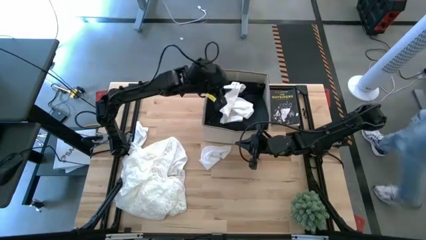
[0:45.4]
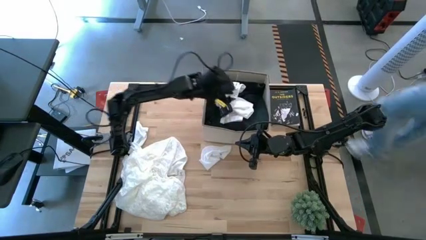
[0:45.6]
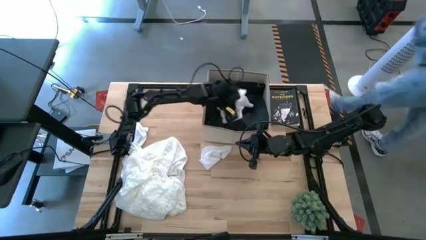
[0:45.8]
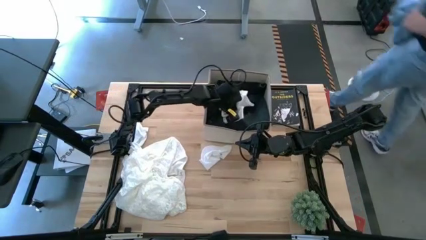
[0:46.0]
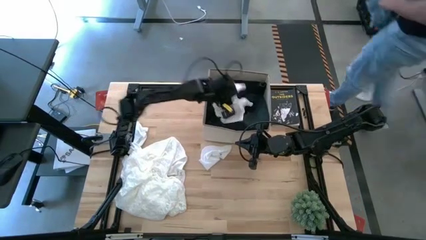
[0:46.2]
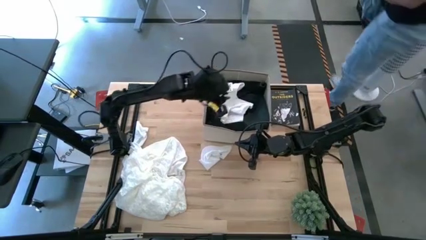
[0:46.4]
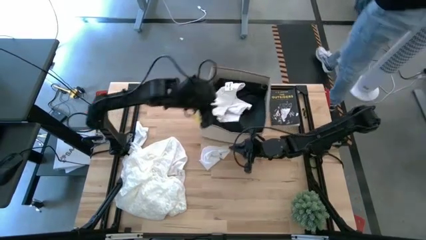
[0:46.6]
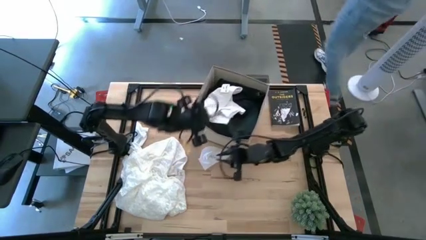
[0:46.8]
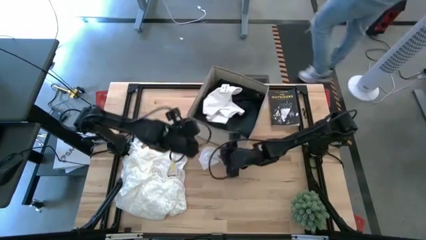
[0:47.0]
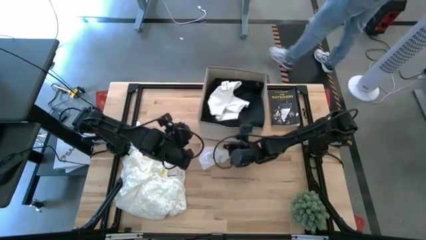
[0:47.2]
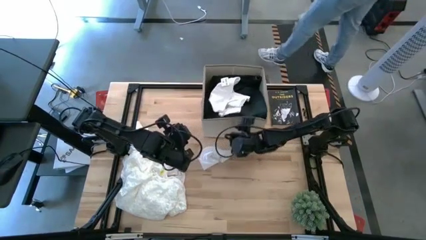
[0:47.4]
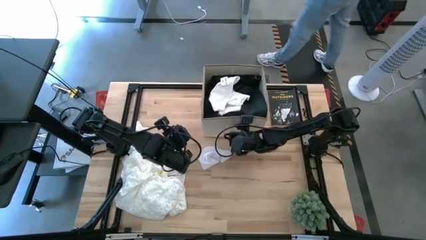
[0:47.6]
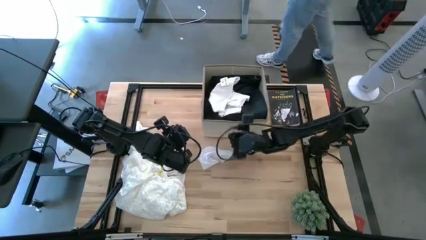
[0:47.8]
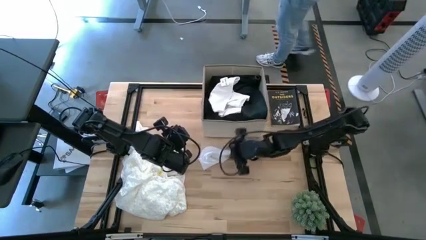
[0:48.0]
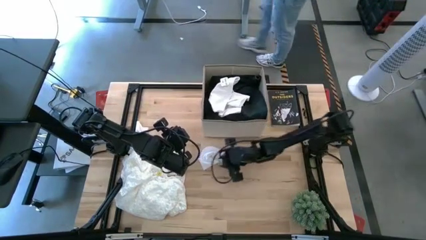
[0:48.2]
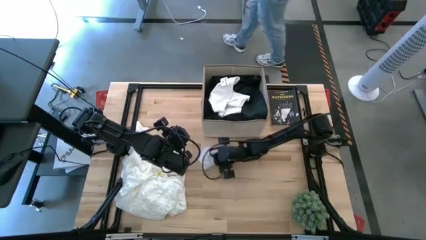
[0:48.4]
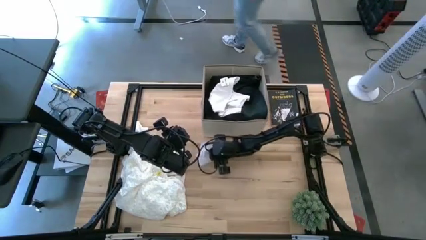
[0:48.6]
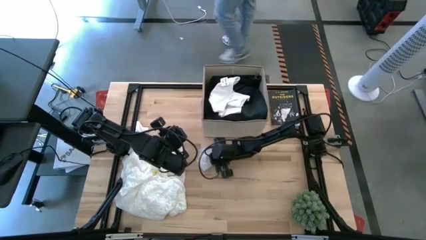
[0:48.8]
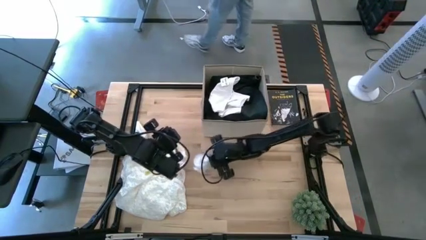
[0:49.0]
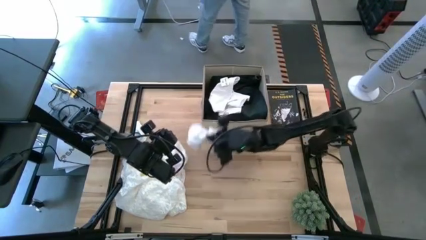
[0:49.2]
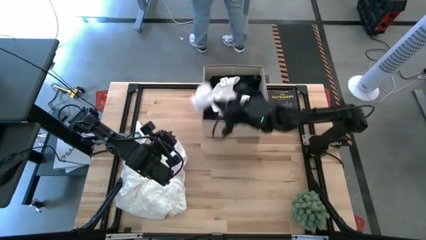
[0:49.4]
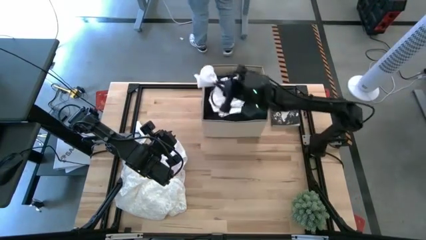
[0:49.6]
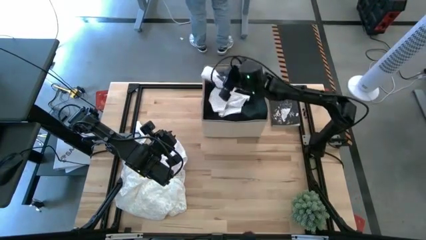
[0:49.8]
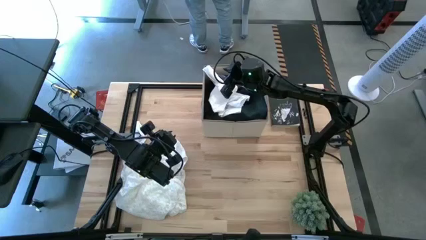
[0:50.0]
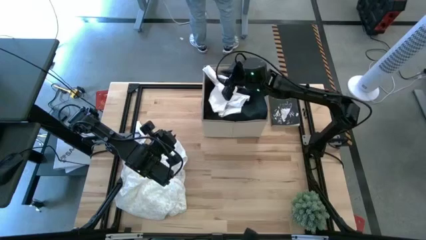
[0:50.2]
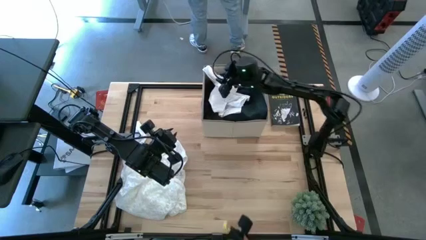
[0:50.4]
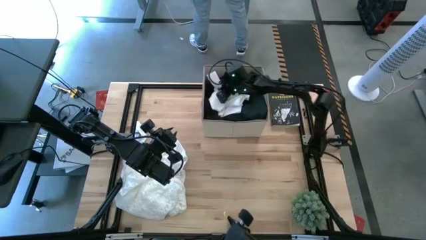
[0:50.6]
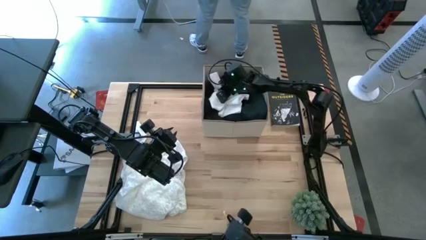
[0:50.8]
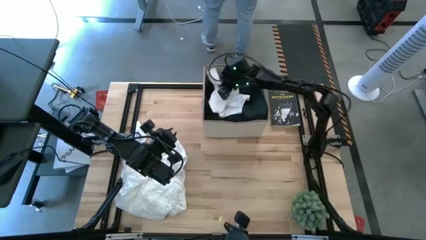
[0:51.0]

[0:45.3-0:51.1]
Task: Sort clothes
Put the right white sock into the laundry organizer

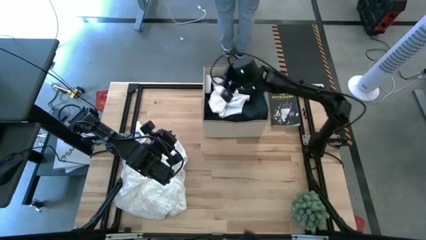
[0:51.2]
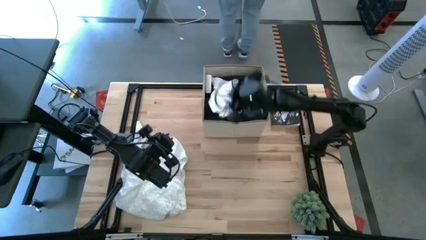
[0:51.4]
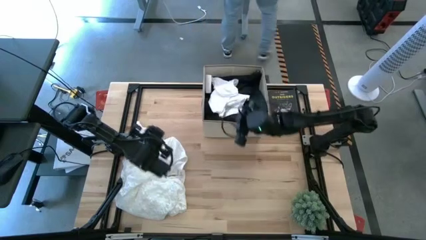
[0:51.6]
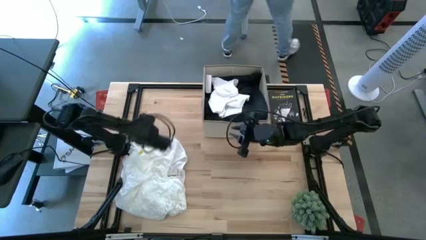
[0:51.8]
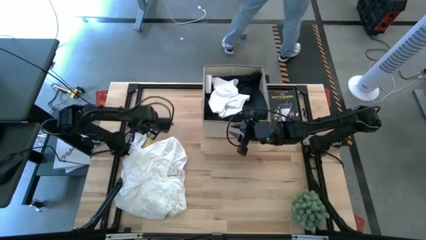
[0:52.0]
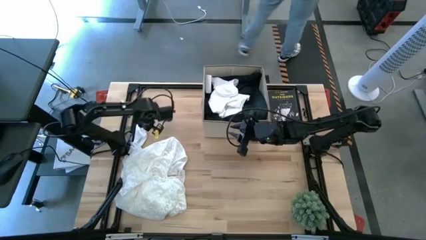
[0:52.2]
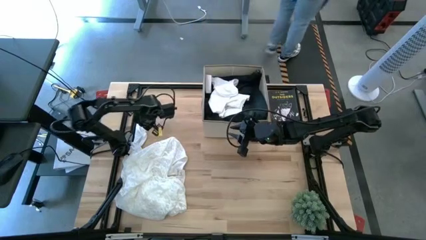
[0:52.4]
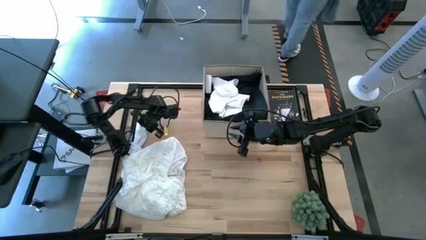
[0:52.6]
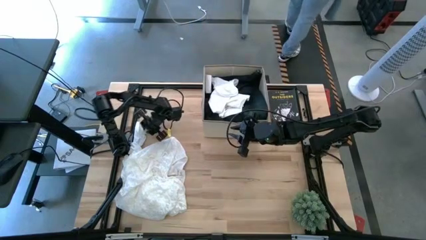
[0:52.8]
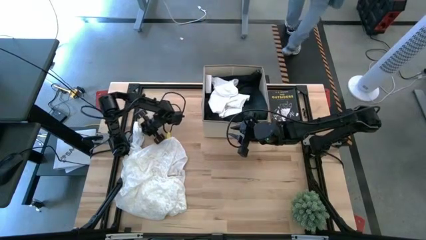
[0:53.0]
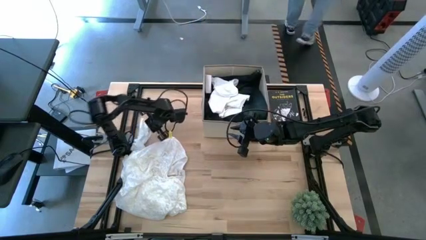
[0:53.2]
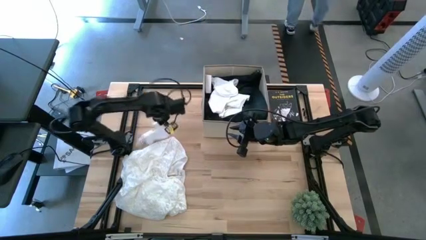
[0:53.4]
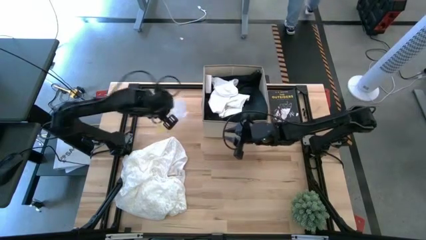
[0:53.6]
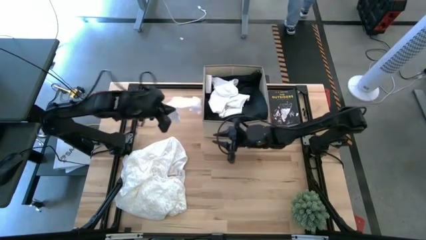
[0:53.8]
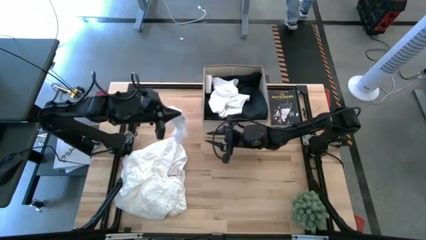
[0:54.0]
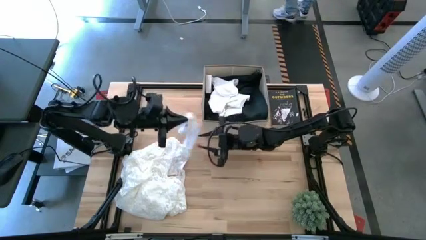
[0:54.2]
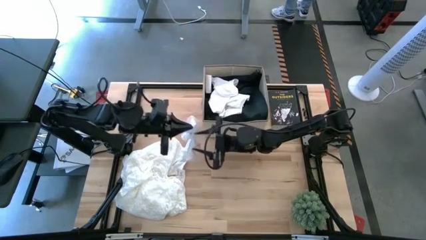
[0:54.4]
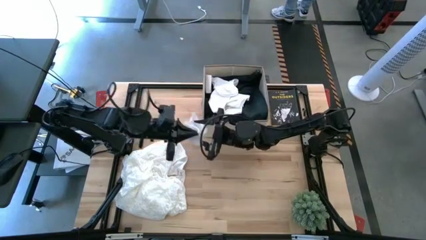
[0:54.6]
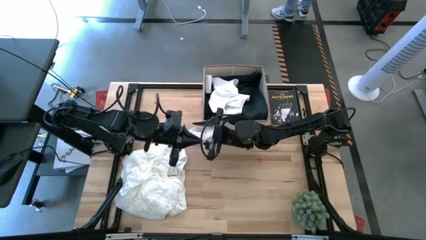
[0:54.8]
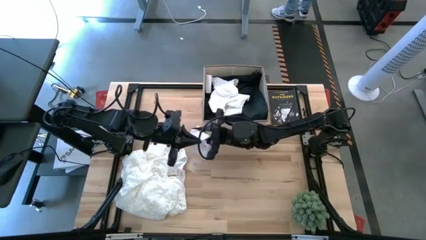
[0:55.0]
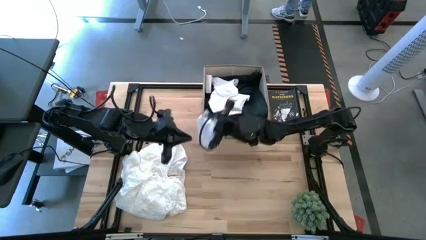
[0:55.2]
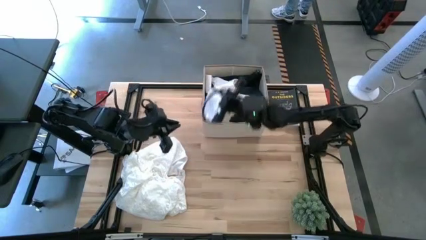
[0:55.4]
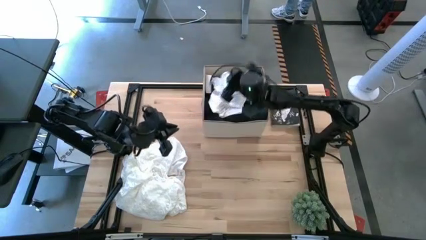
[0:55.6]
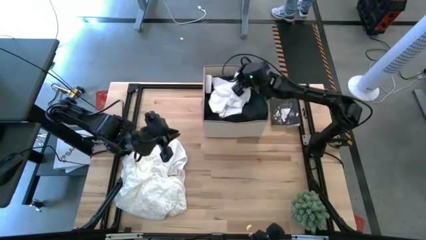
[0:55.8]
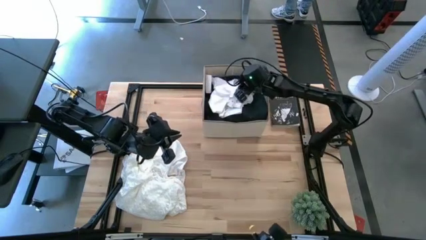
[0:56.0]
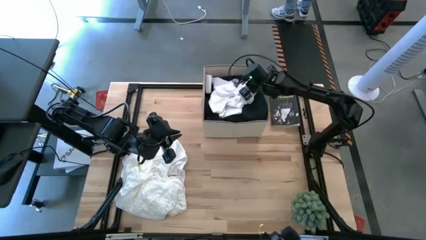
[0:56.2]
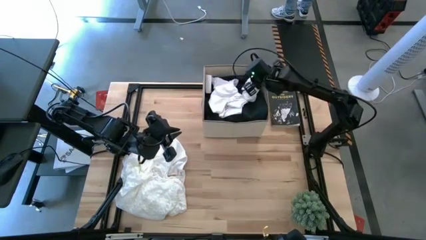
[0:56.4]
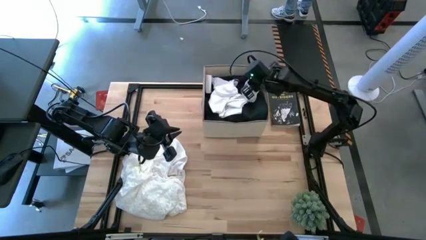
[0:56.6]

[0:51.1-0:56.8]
Put the white sock into the laundry organizer

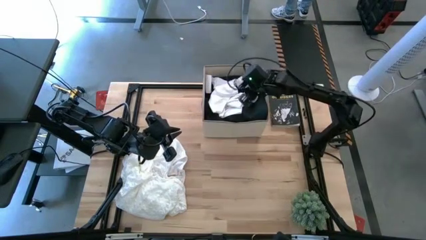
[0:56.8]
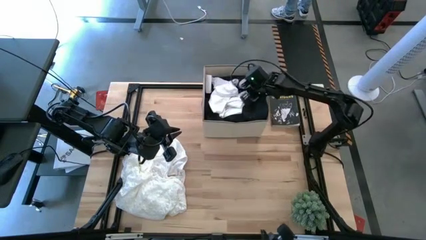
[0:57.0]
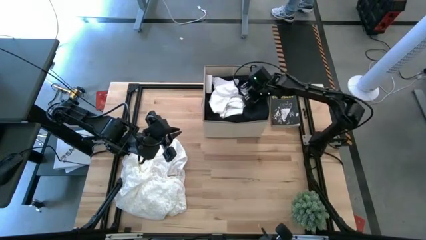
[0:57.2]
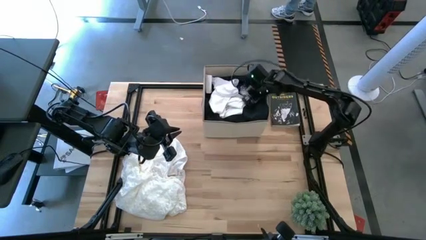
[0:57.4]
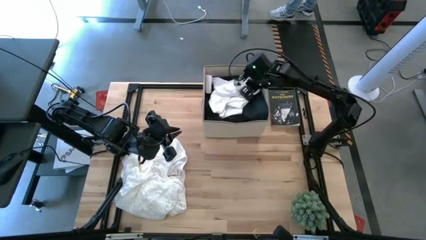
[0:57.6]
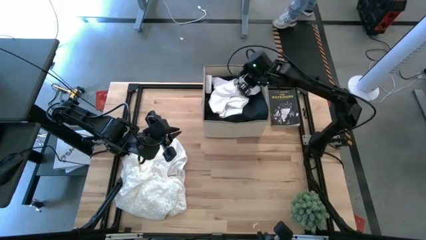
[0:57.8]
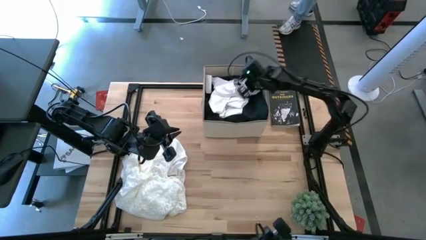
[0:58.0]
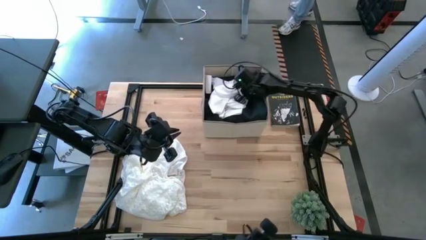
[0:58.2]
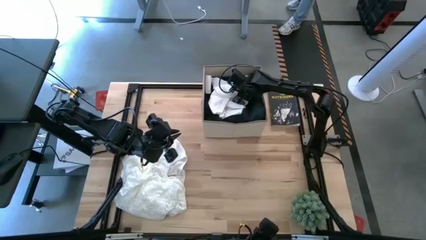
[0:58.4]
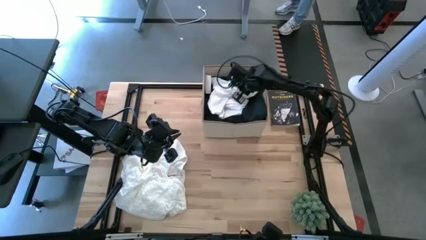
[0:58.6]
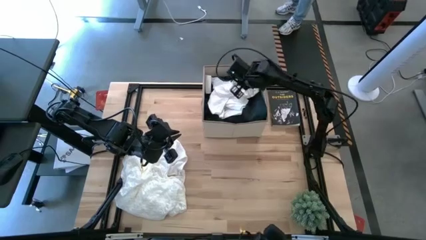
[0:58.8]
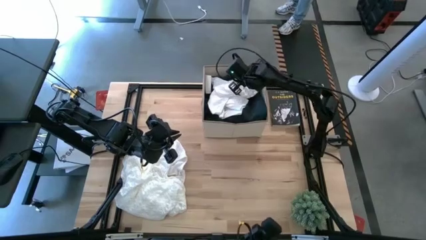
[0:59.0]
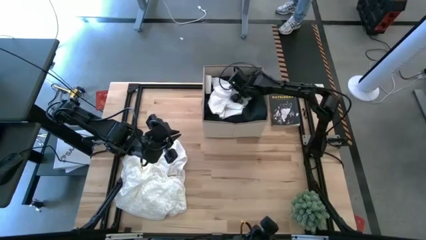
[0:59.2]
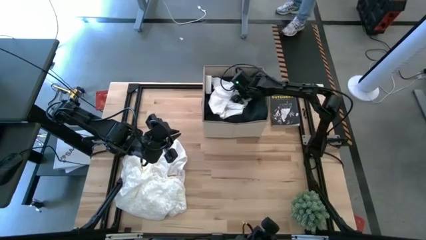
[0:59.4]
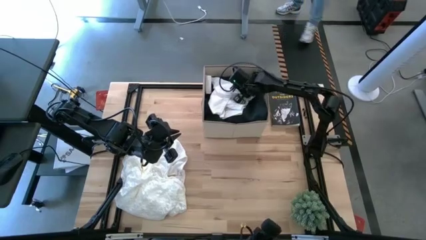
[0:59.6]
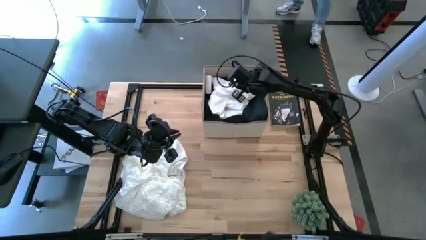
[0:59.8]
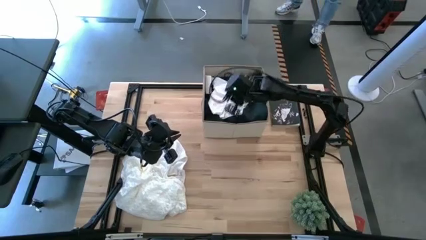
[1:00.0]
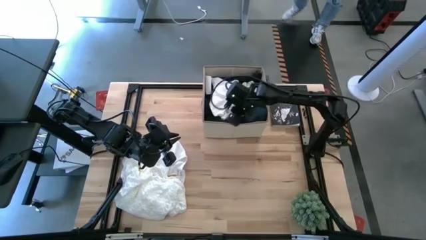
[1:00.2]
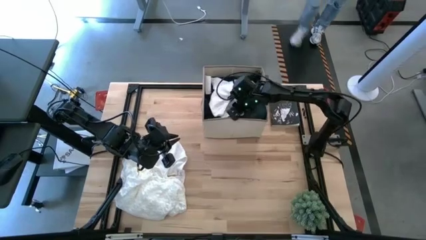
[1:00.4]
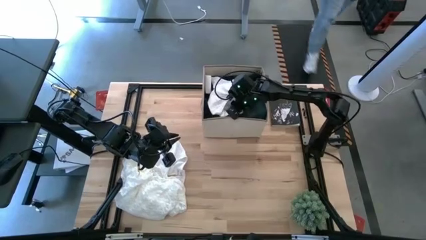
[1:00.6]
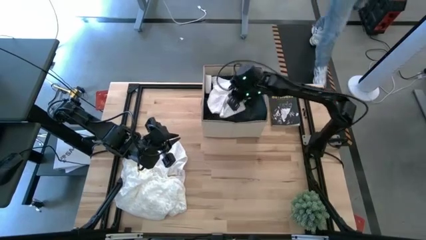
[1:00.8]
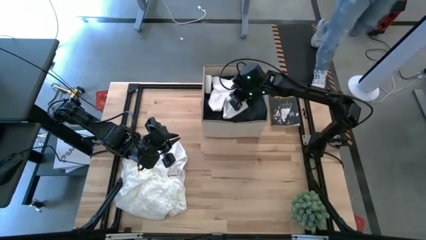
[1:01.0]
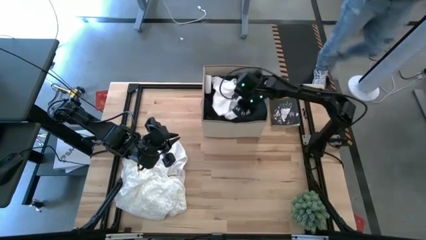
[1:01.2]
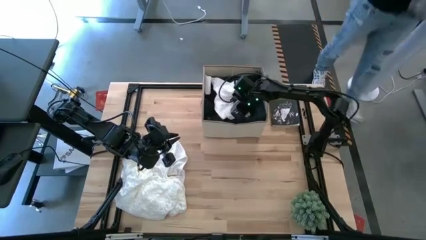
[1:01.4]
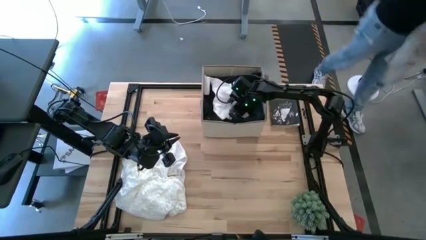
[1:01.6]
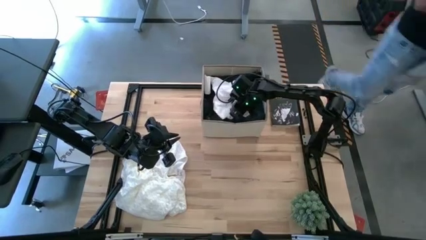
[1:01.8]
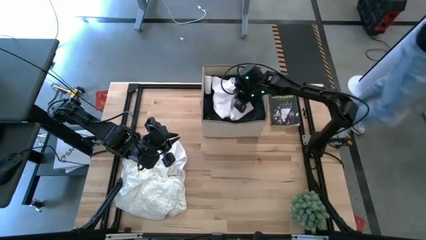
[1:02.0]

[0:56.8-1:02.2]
Adjust the white sock in the laundry organizer
